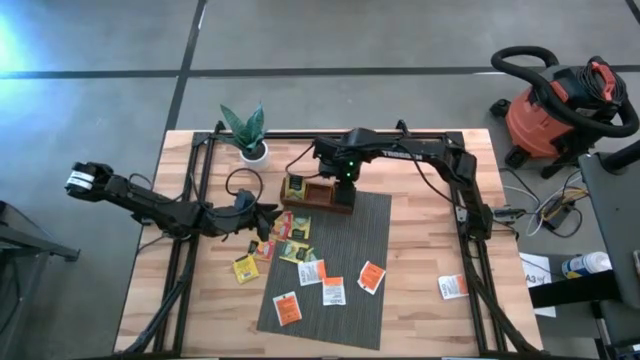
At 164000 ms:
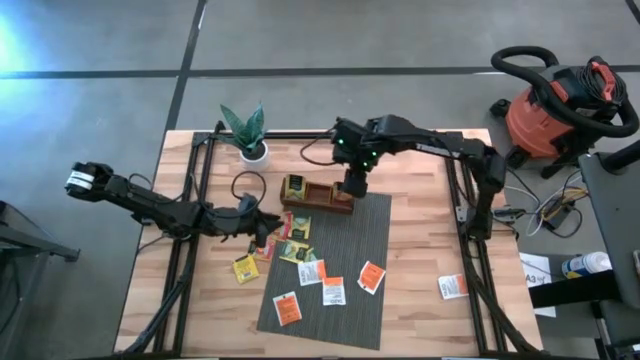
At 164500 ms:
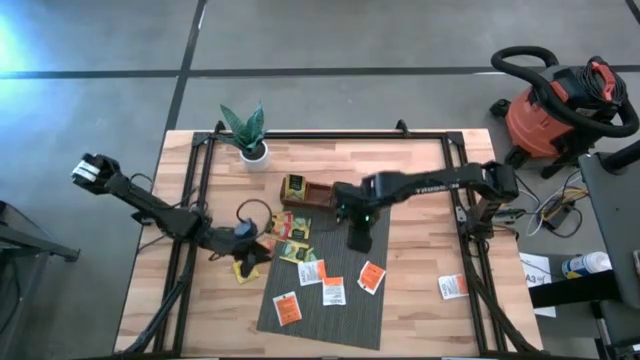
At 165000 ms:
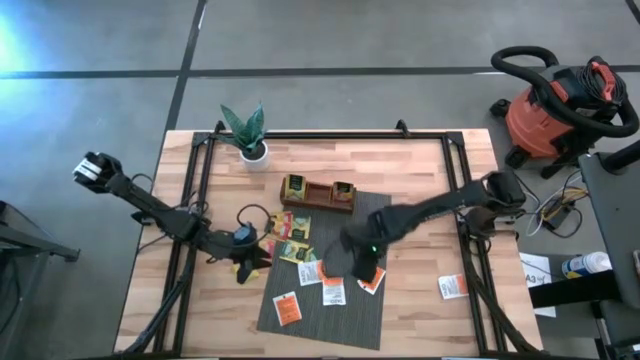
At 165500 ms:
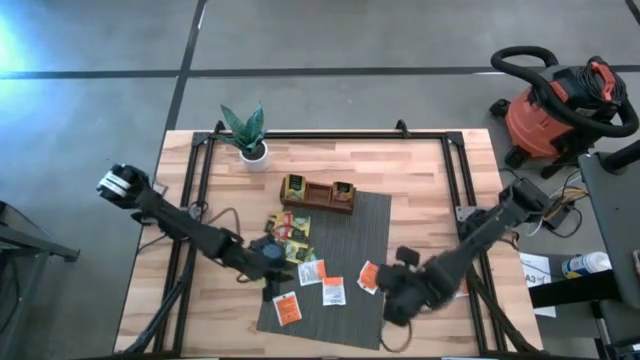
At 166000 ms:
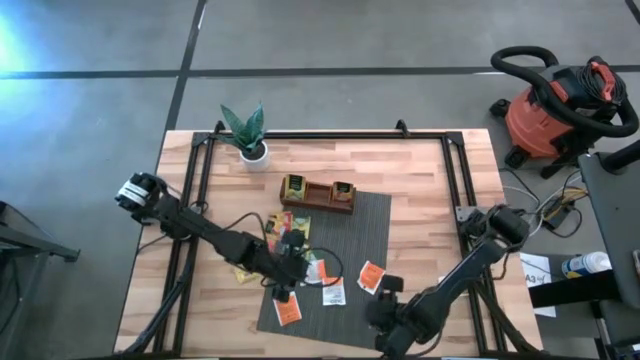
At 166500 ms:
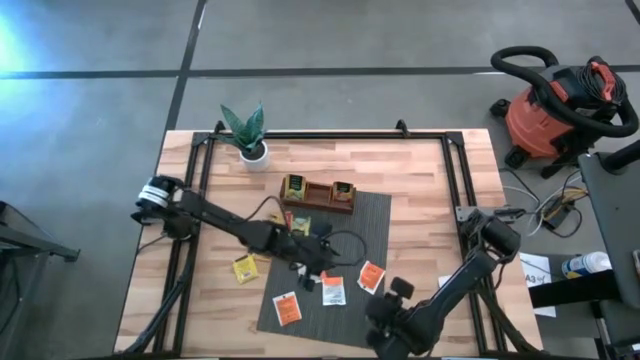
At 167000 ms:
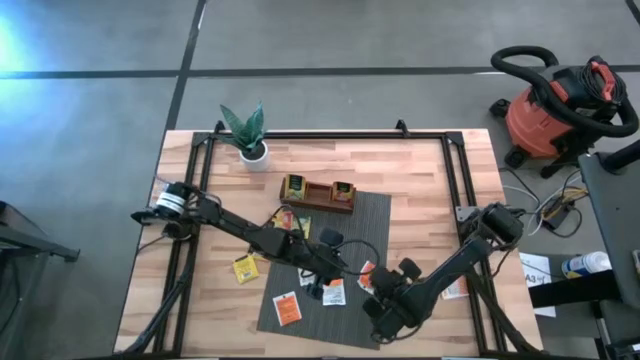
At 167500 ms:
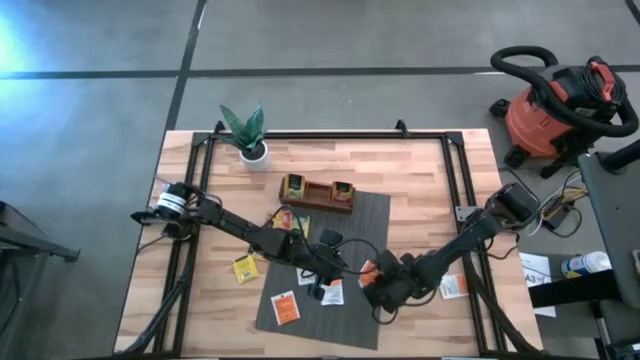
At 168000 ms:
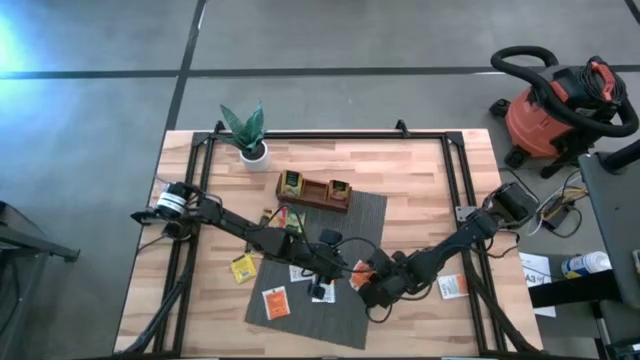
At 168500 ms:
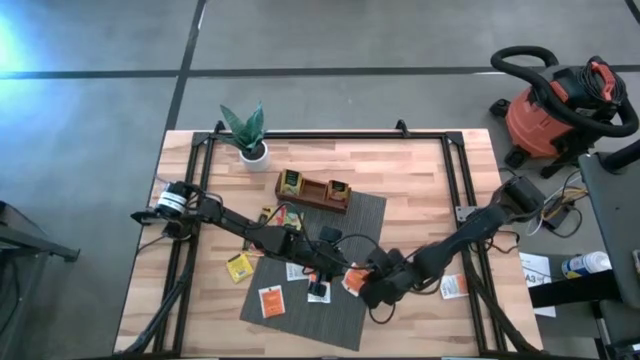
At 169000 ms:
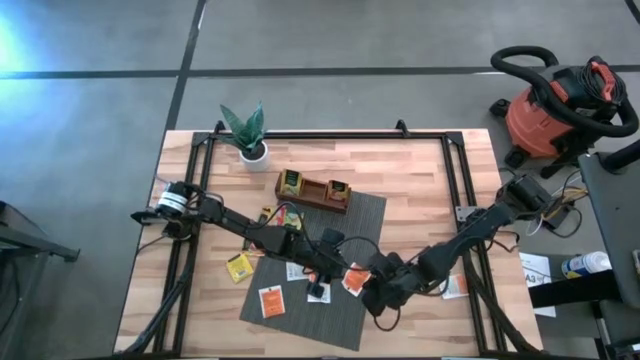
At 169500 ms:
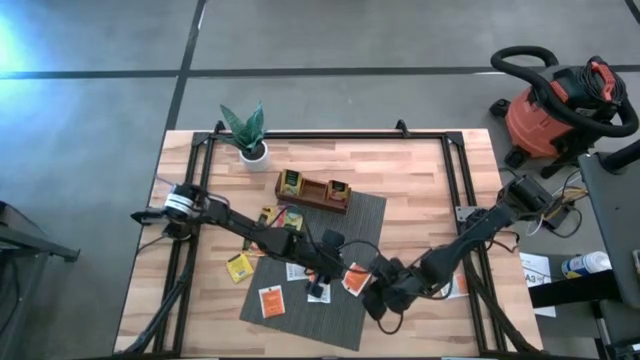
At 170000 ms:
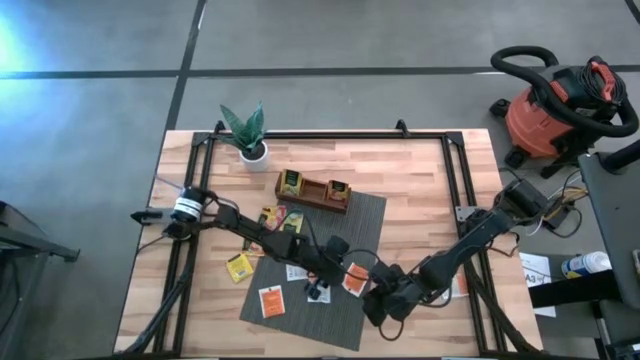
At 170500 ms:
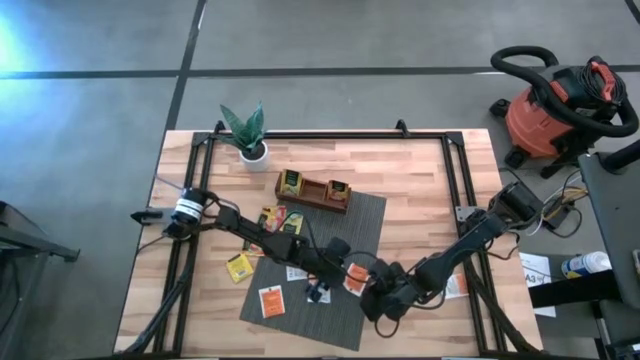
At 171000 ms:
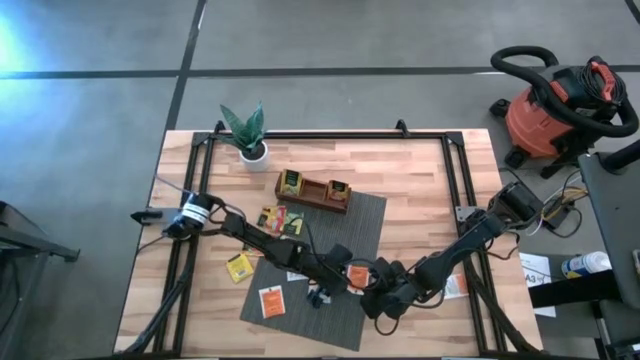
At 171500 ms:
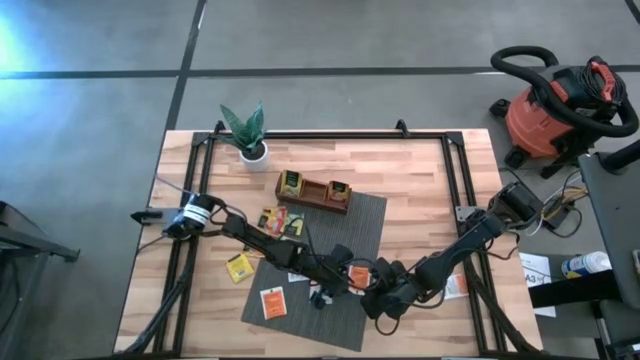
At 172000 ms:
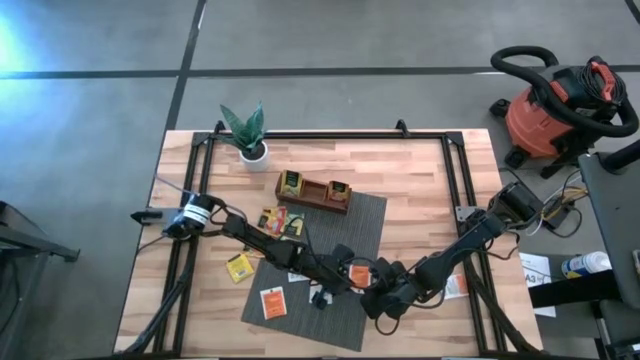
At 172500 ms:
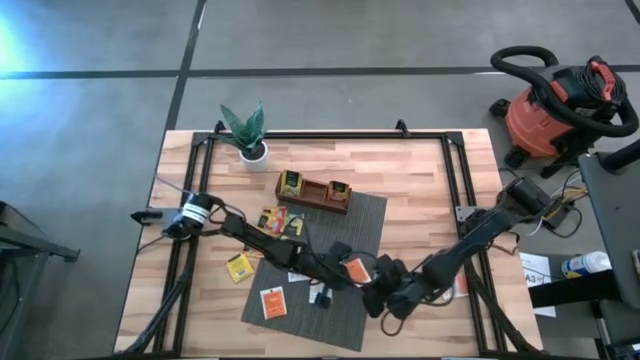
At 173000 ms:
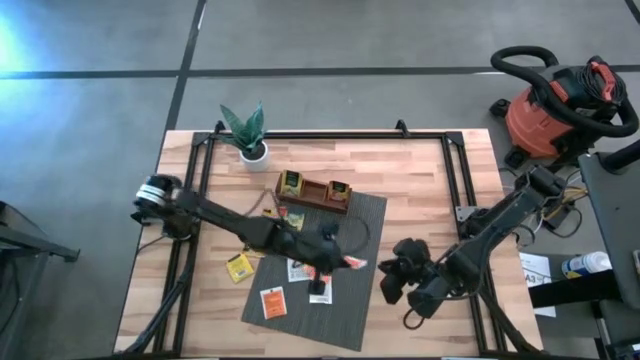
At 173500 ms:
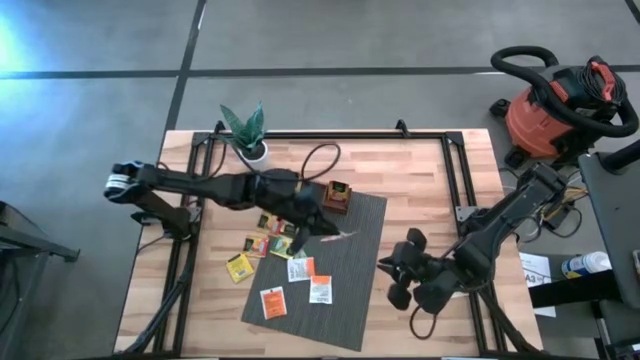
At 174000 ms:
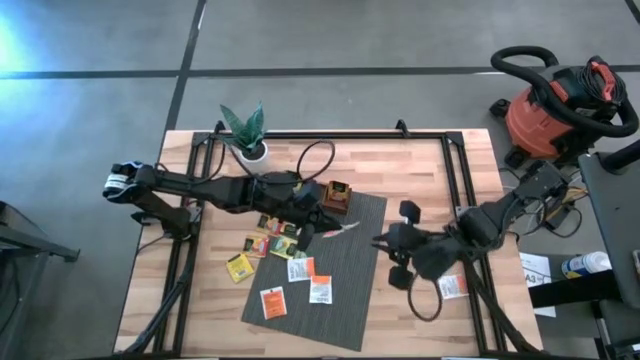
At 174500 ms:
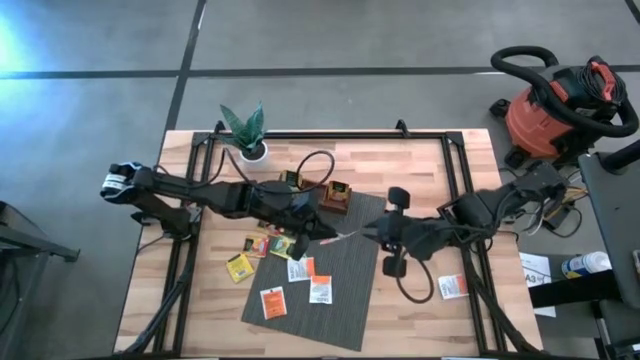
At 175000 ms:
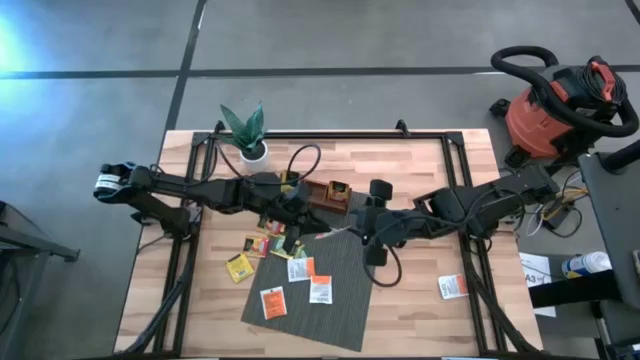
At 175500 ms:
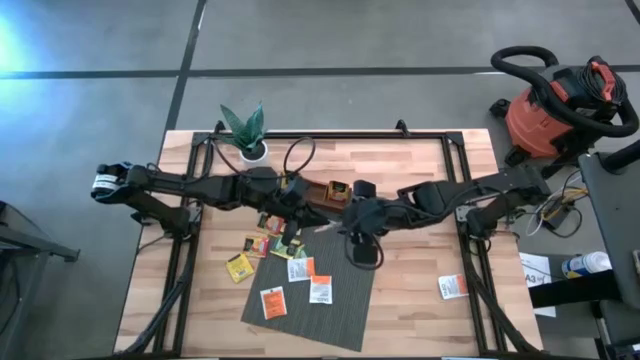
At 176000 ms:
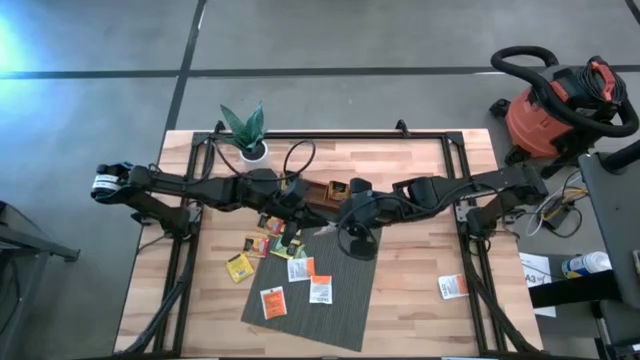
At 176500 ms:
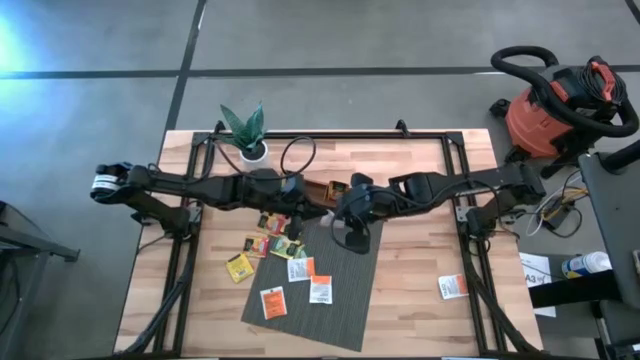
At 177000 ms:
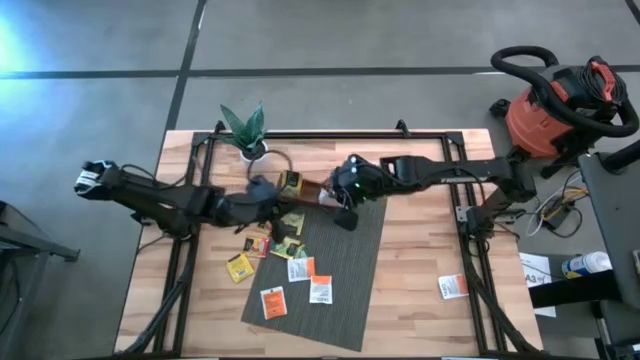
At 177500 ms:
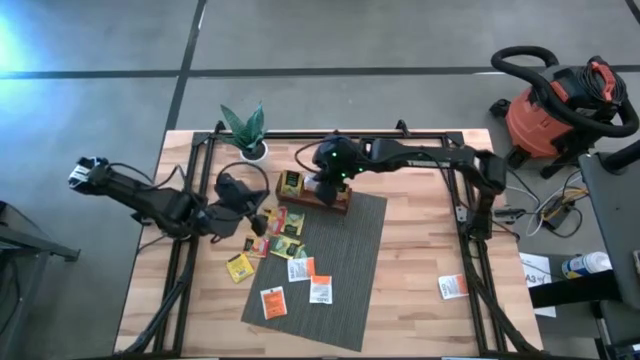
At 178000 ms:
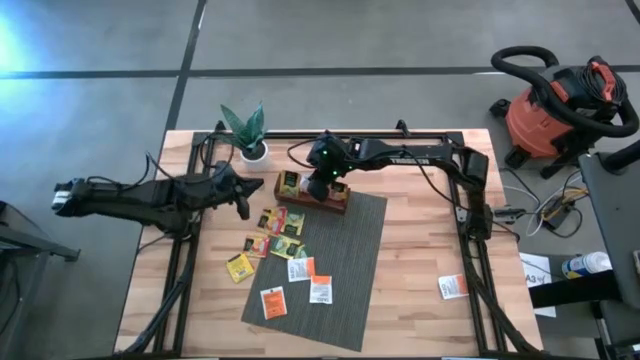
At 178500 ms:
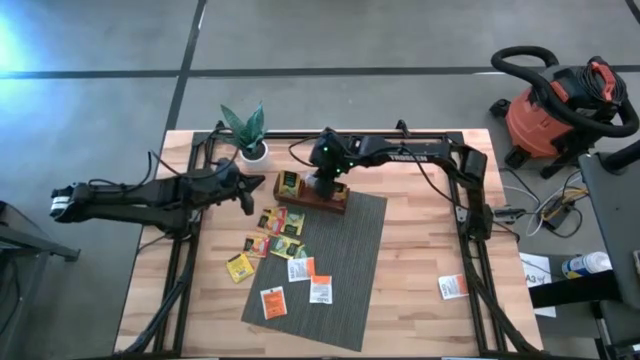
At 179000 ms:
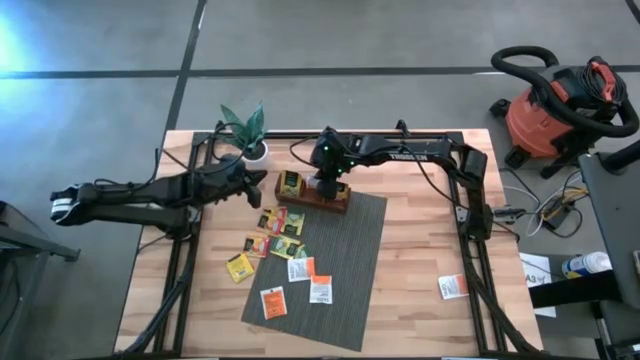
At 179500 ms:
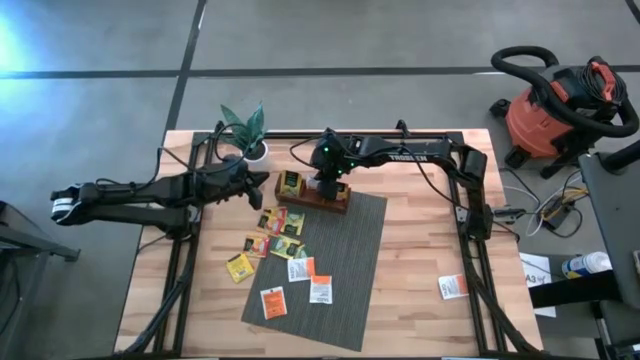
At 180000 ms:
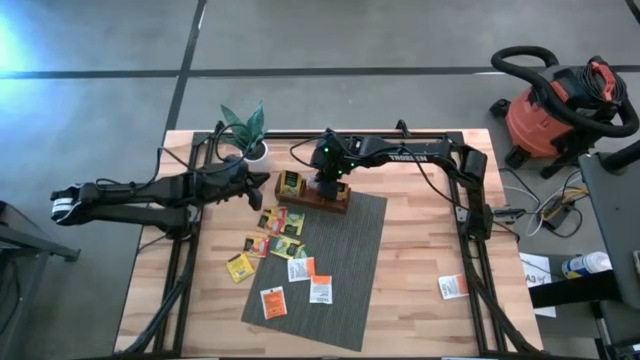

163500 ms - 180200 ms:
Task: Pick & Place Tea
Put the white tea bag into the middle compartment of the wooden organizer

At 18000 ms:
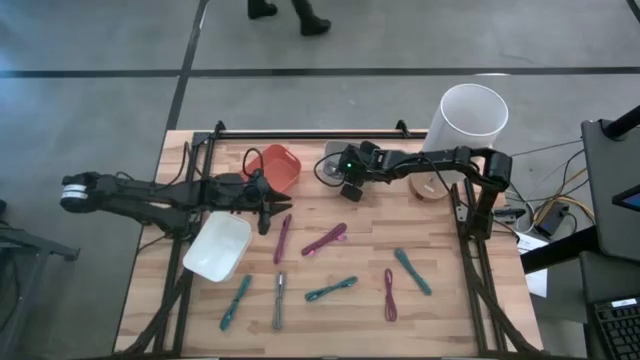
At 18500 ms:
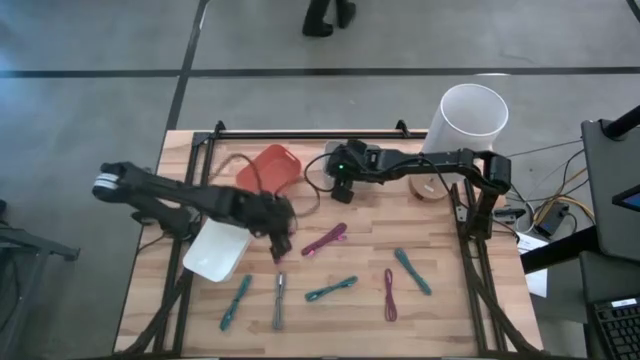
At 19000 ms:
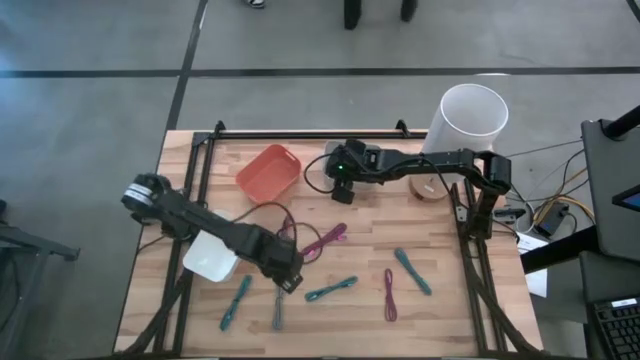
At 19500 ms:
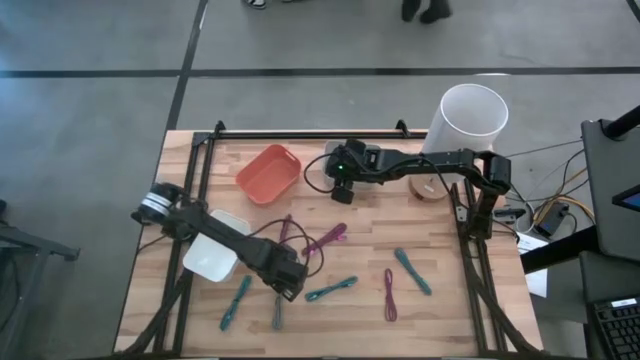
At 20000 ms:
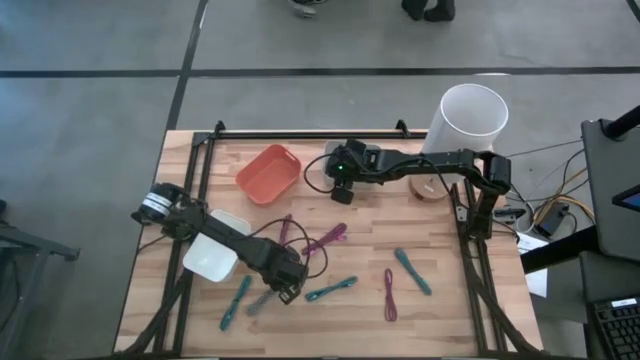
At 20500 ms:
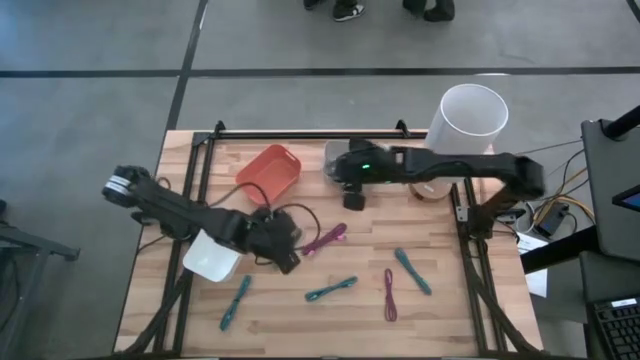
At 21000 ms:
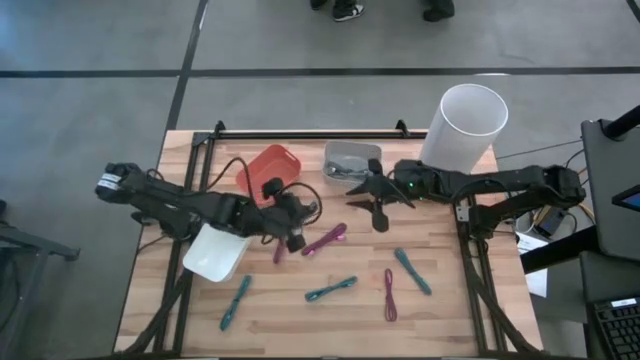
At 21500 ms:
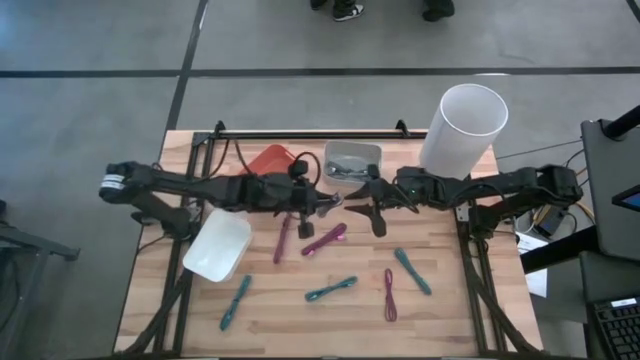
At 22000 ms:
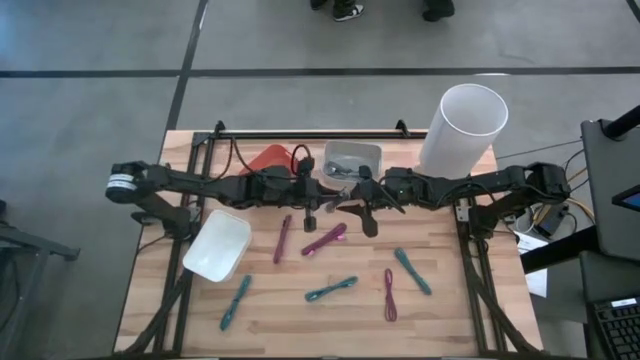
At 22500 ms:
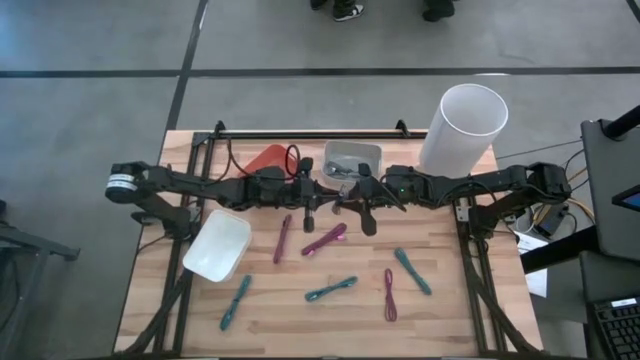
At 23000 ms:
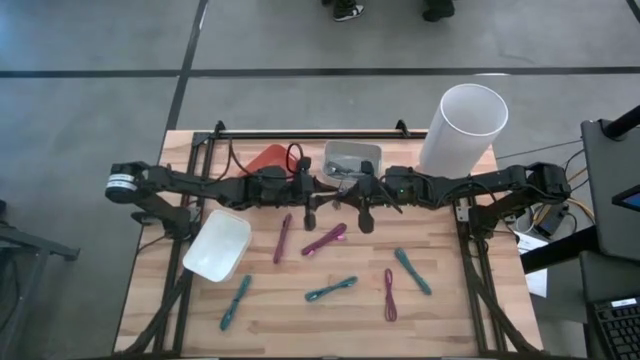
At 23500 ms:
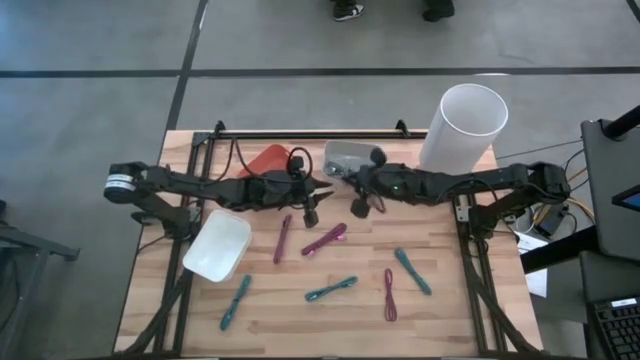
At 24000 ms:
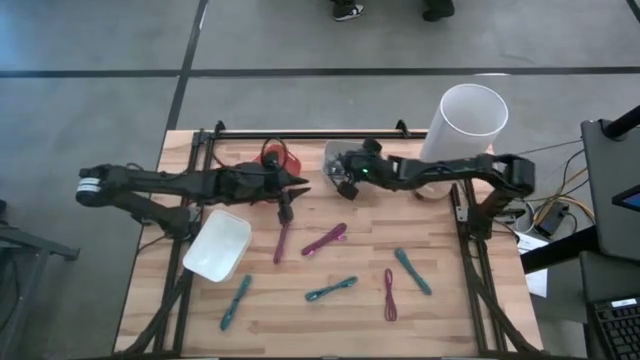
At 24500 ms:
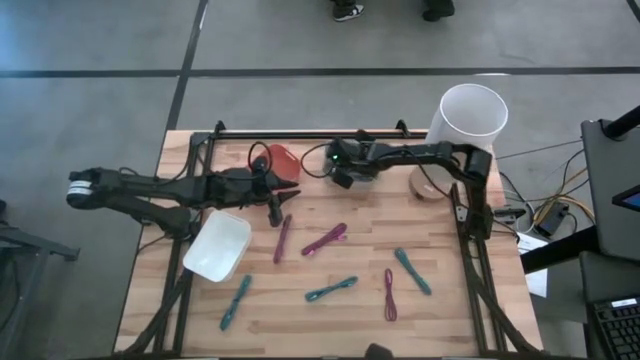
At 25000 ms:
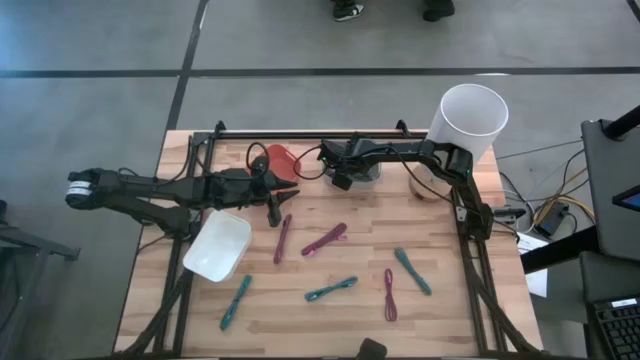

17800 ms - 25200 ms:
Task: Pick & Place USB Port
Put the white USB cable into the gray bin
